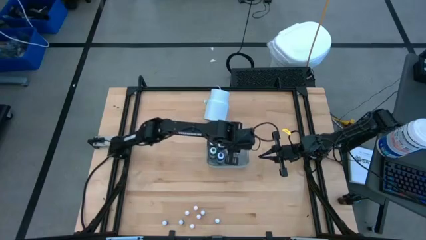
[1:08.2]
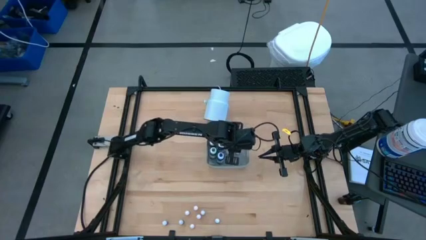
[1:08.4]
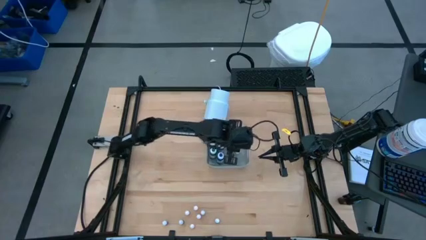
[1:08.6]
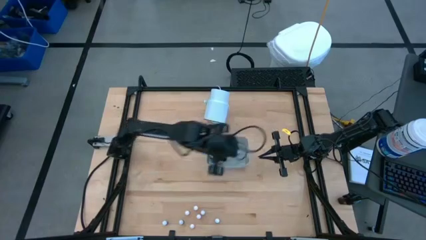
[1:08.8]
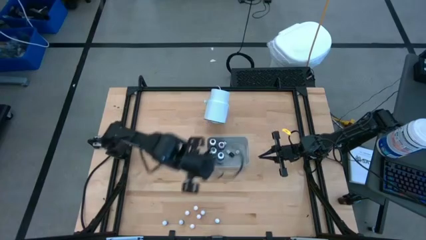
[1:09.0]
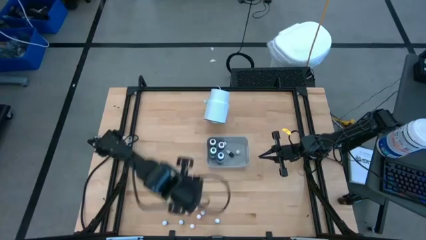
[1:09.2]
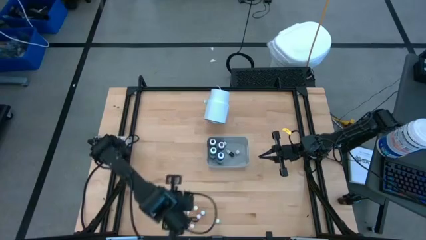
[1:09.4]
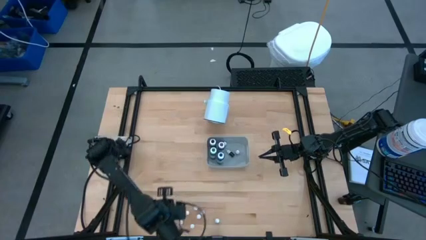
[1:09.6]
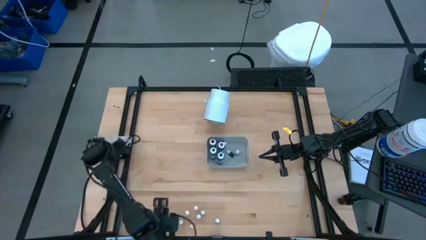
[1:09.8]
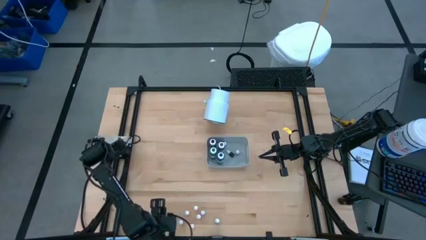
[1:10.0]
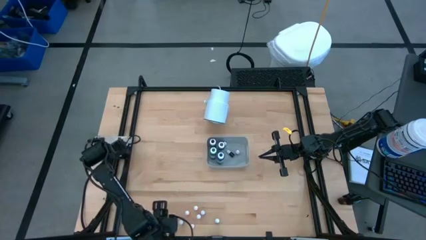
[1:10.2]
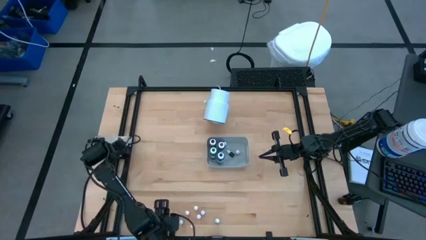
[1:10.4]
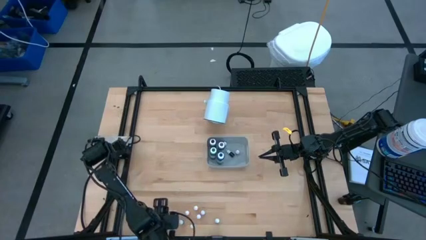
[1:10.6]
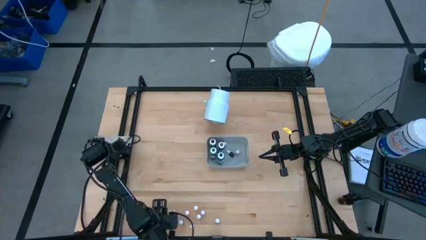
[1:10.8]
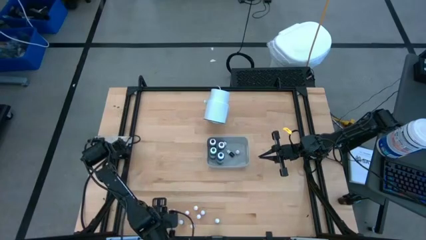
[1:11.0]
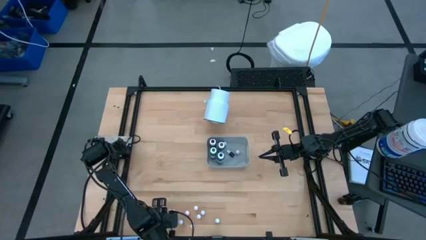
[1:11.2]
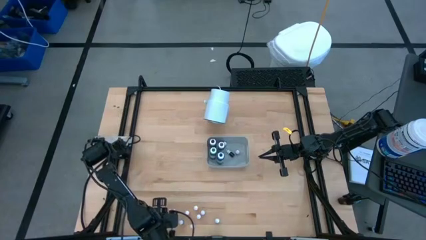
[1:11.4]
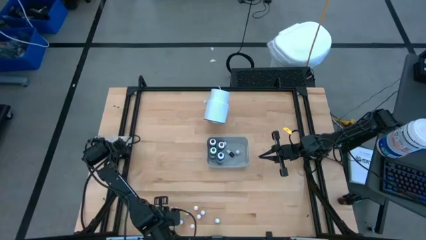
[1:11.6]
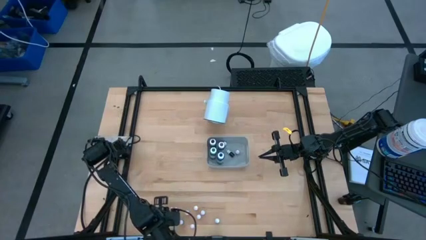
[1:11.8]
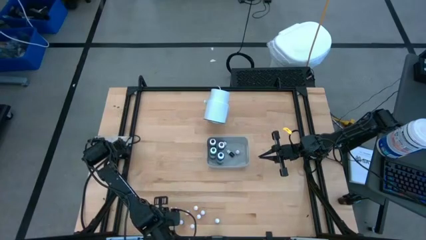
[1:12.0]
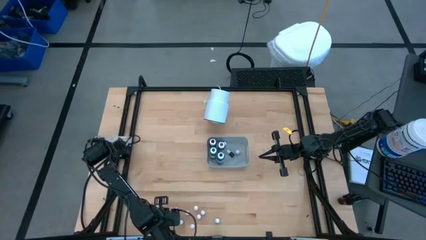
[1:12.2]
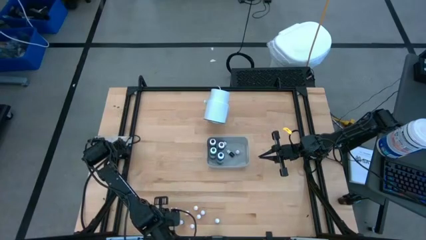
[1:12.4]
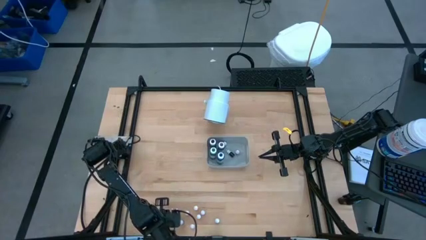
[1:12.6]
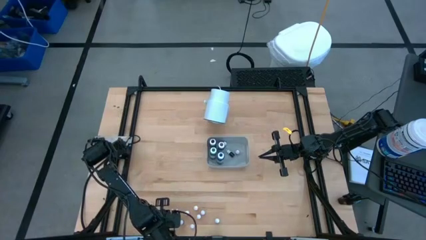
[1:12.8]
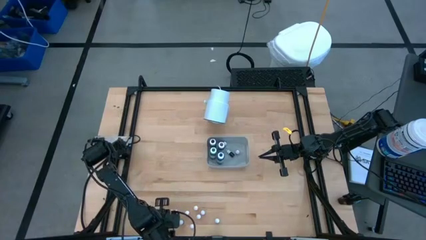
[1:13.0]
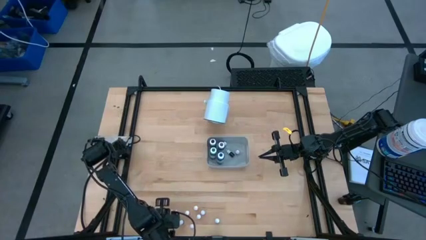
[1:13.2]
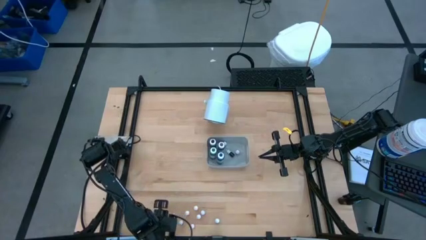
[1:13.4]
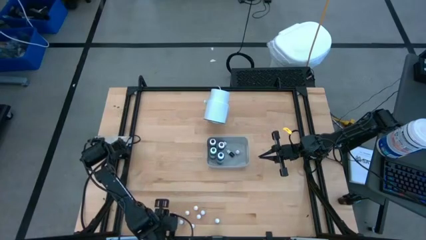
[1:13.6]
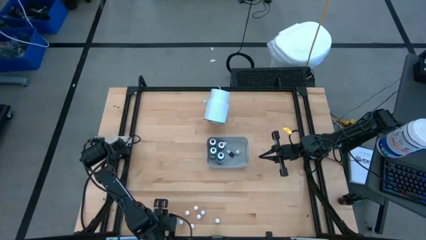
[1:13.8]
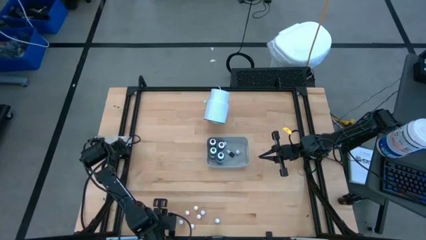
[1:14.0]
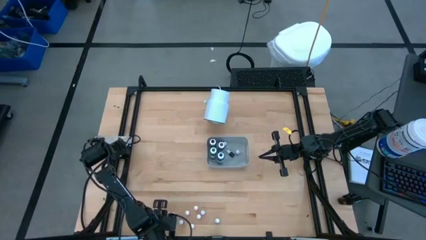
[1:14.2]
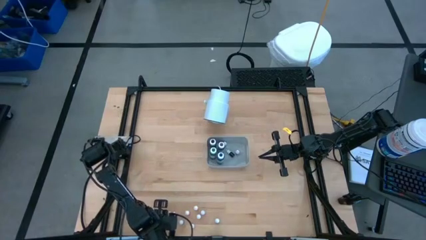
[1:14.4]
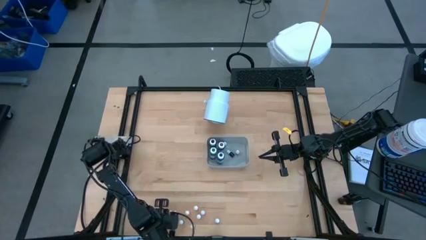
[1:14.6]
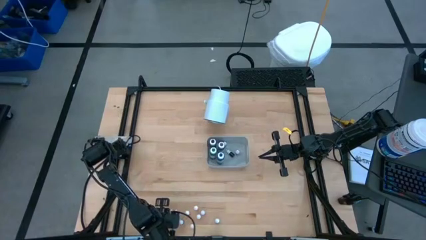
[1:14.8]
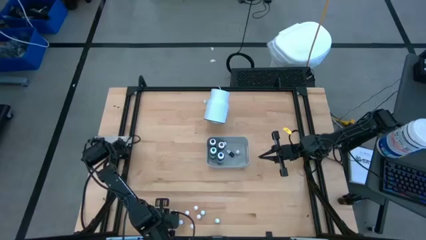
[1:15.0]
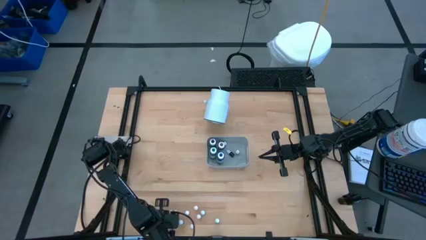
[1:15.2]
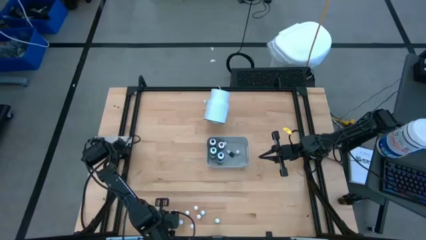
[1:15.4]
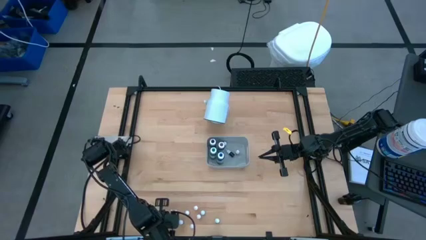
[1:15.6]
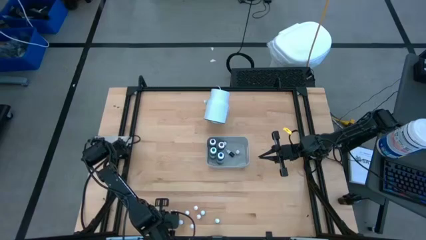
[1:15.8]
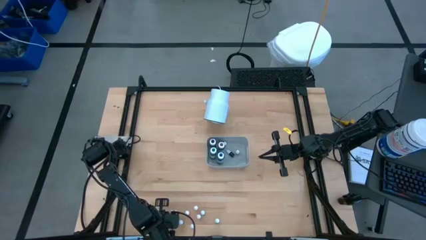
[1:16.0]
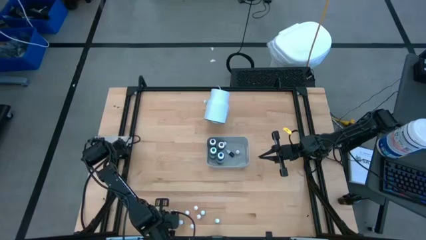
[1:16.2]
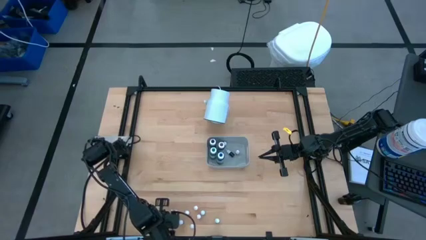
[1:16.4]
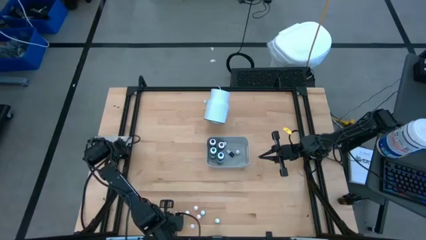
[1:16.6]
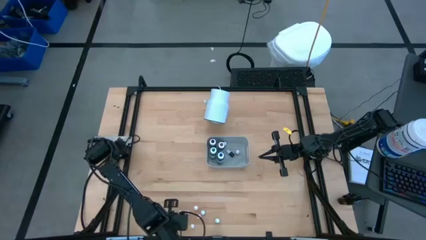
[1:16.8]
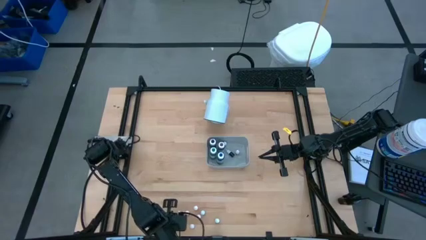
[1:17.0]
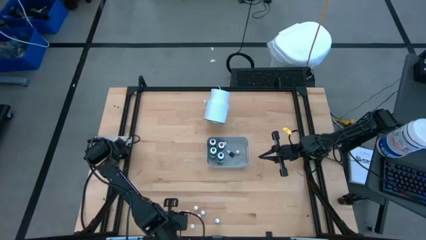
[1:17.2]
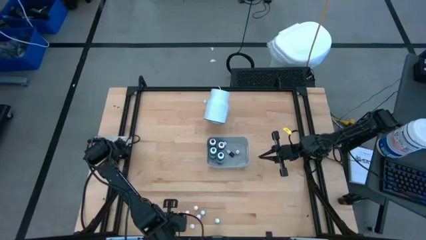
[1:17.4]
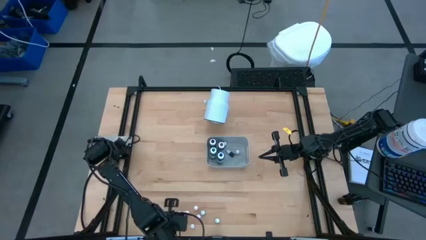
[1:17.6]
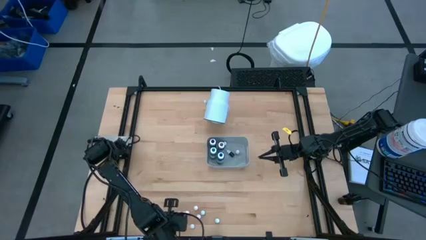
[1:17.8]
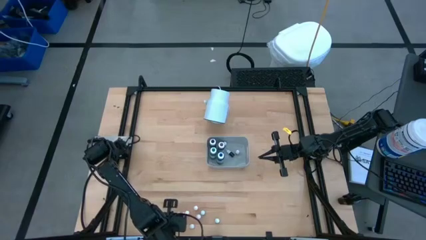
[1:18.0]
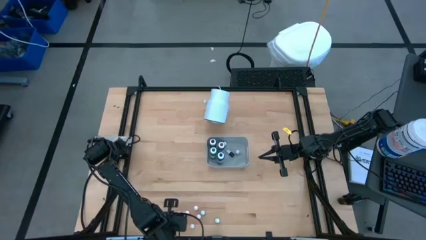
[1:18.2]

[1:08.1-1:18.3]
Task: Pick & Place food coloring
Put the small blue food coloring bottle into the gray bin
